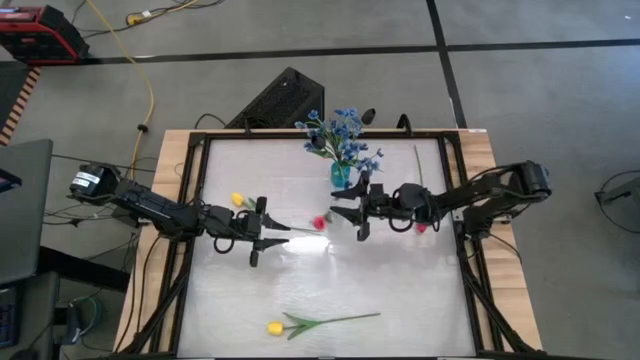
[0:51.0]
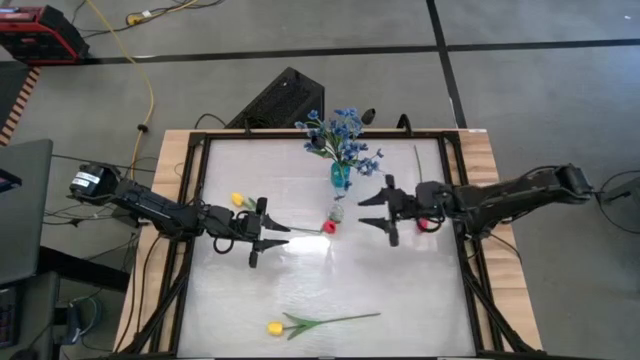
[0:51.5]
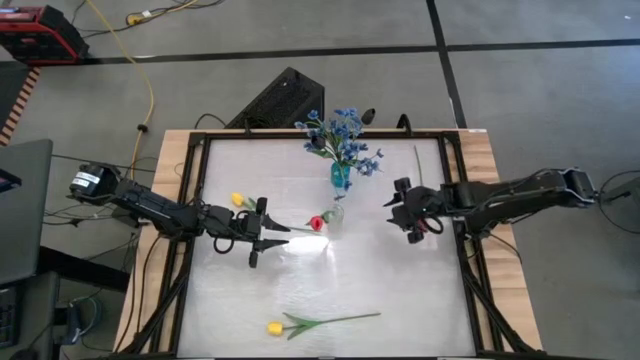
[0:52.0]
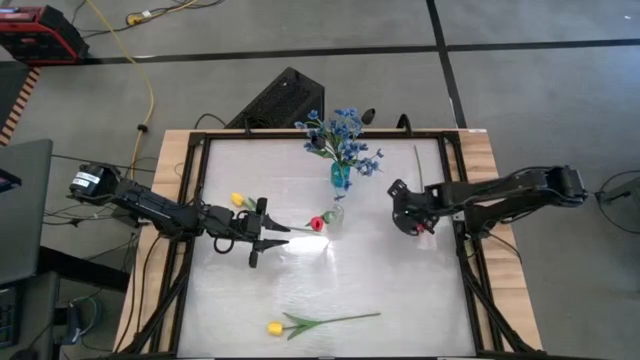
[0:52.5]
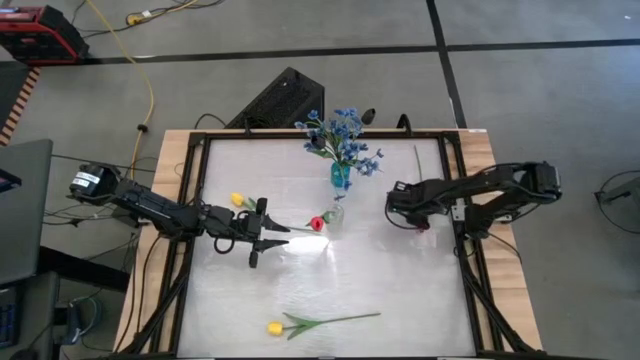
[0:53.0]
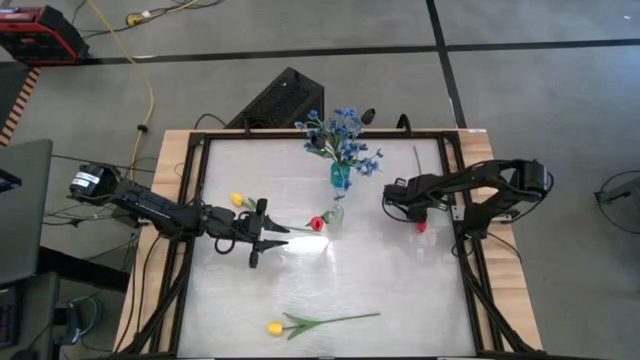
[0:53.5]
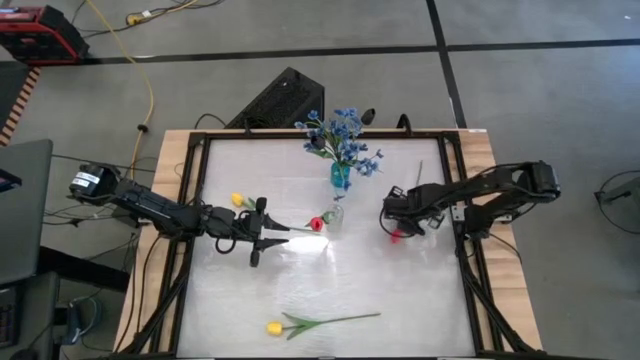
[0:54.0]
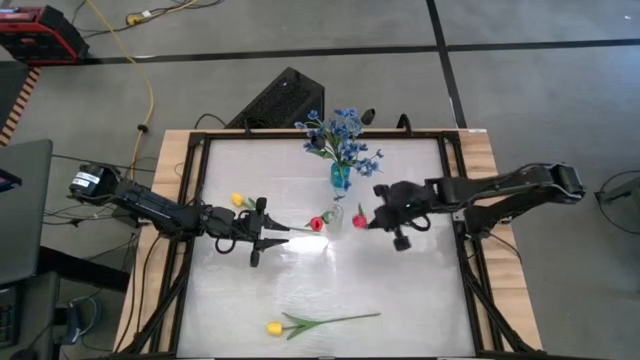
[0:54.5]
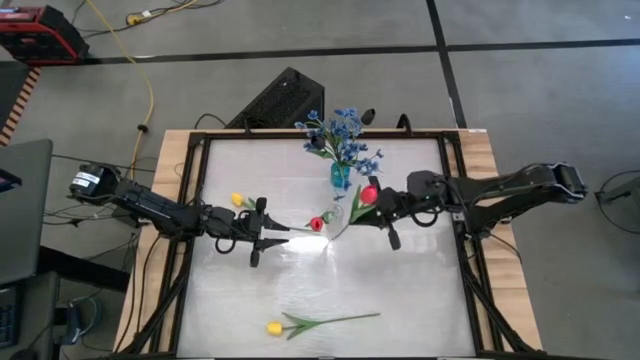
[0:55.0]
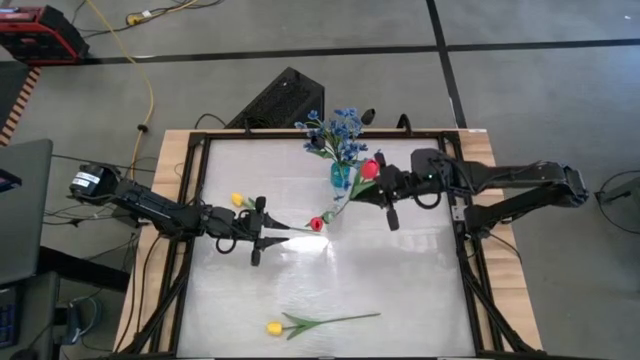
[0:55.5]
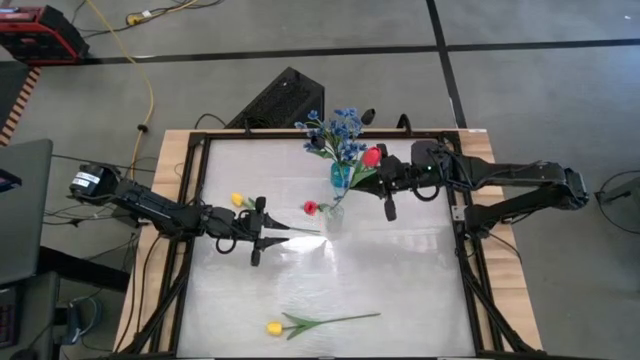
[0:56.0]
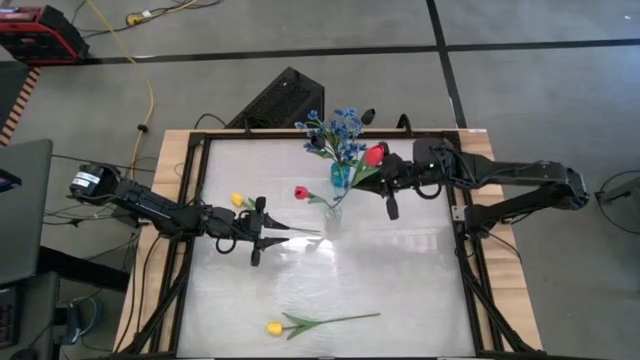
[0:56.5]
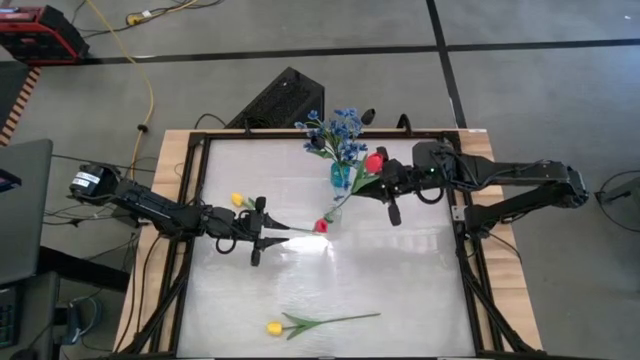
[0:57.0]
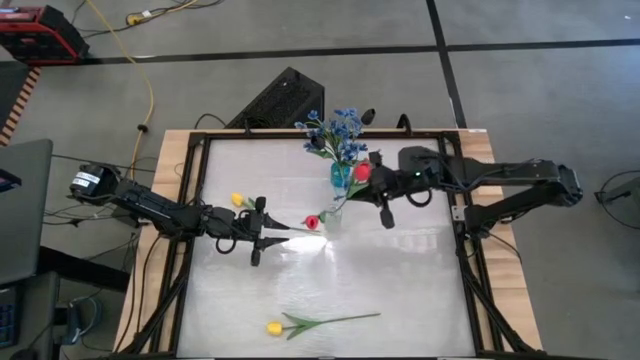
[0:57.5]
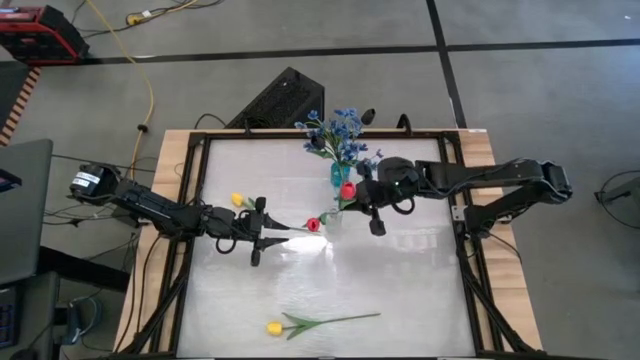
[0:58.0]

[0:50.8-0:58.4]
Task: Sort flowers into vase by color
Put the red flower into the transparent vase

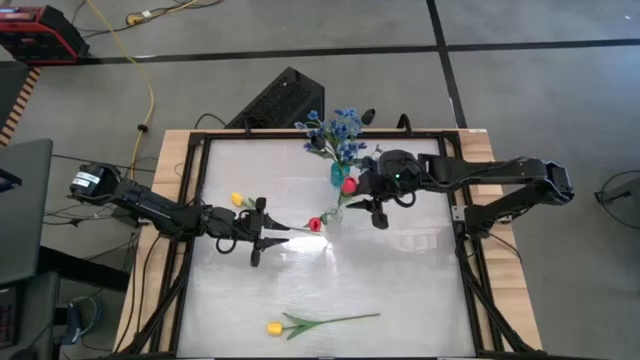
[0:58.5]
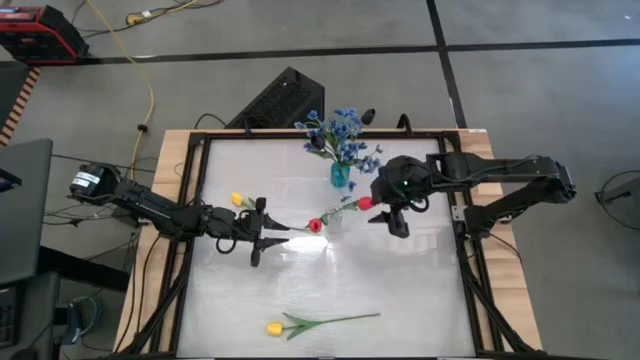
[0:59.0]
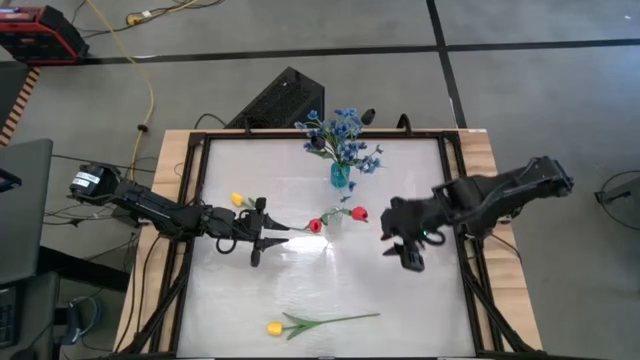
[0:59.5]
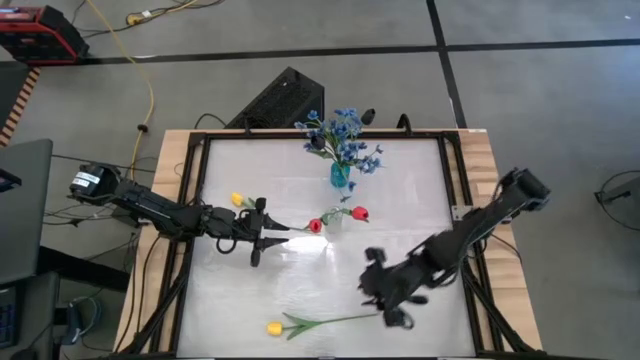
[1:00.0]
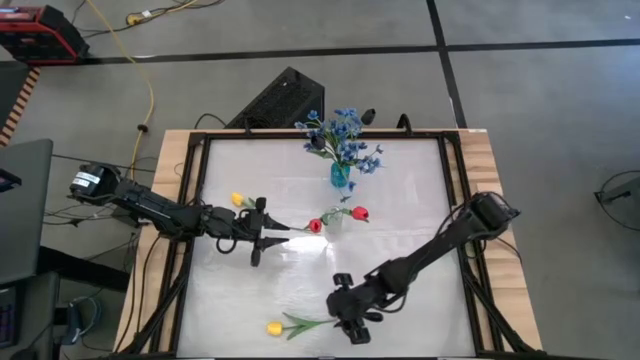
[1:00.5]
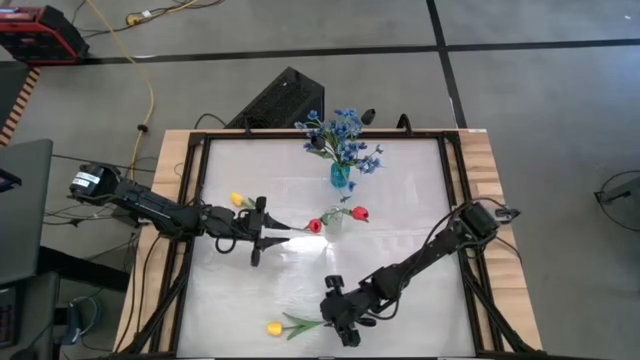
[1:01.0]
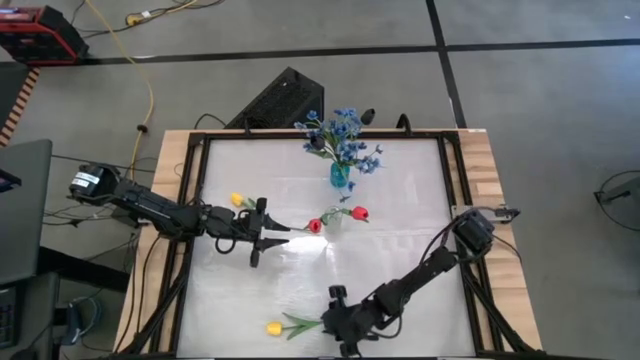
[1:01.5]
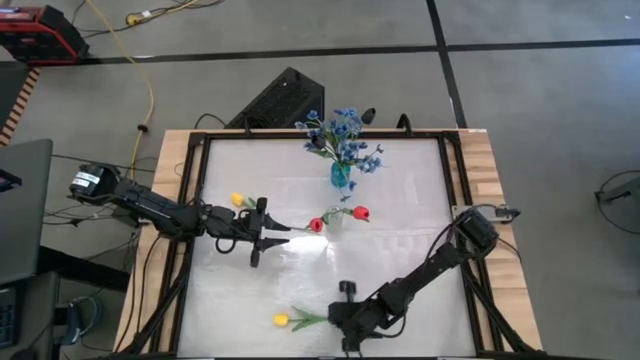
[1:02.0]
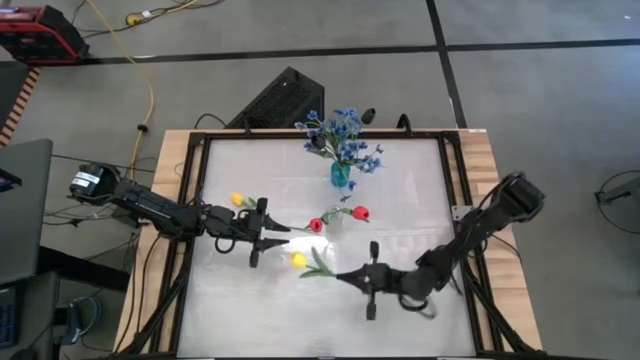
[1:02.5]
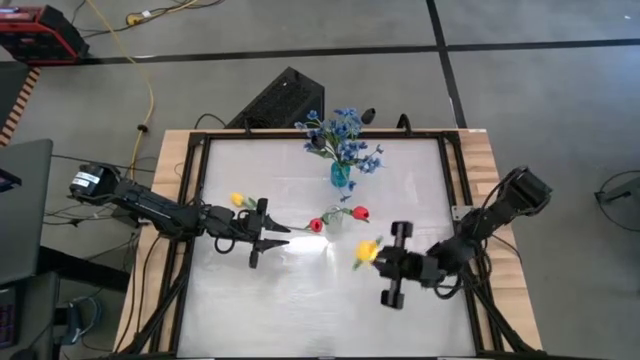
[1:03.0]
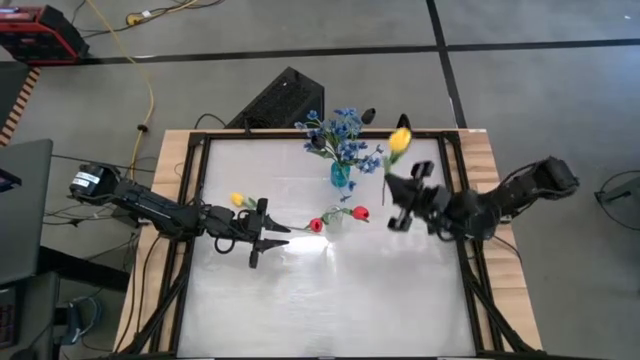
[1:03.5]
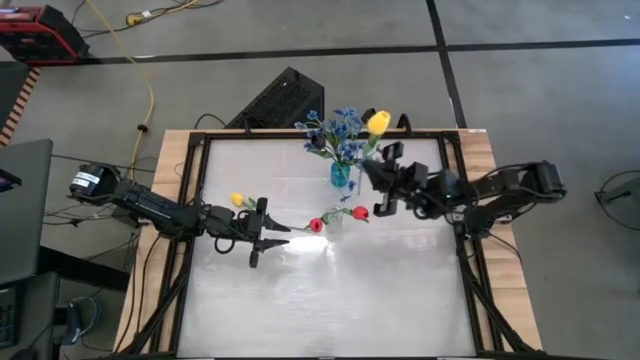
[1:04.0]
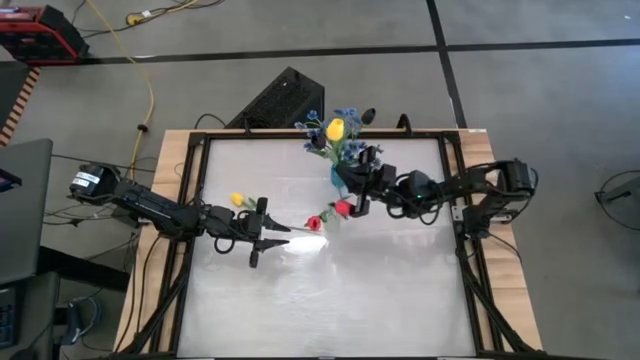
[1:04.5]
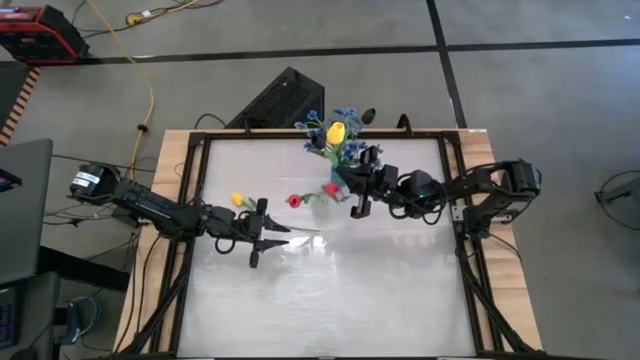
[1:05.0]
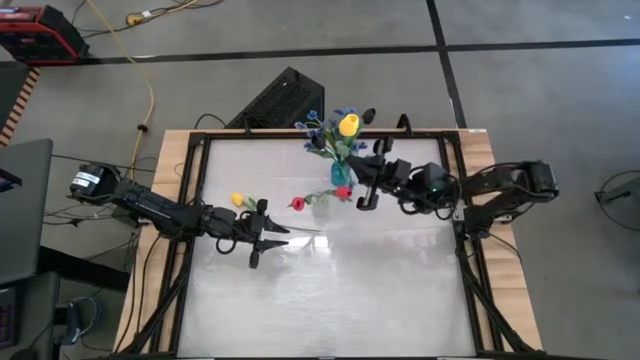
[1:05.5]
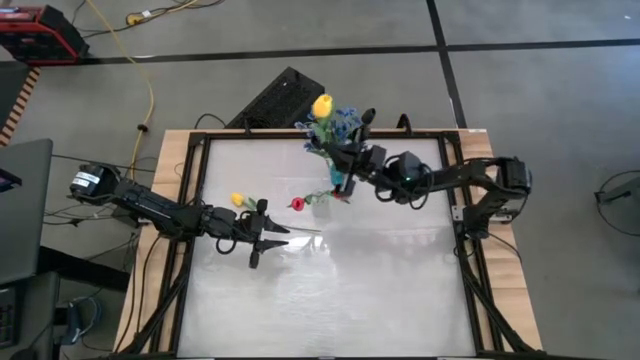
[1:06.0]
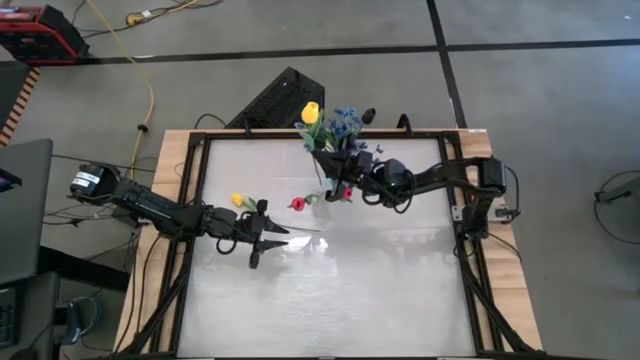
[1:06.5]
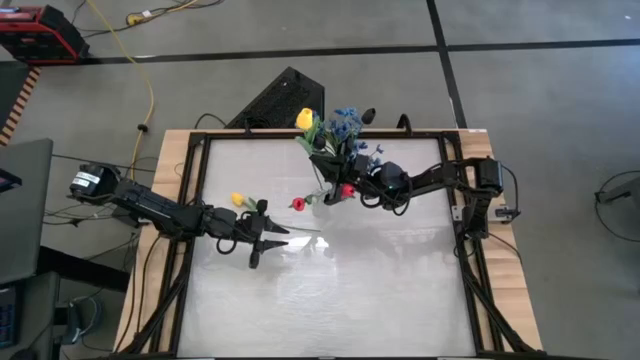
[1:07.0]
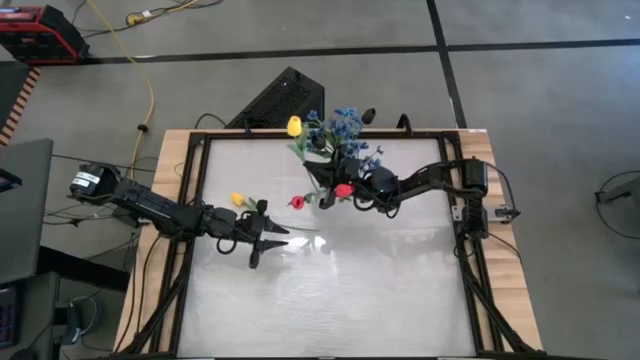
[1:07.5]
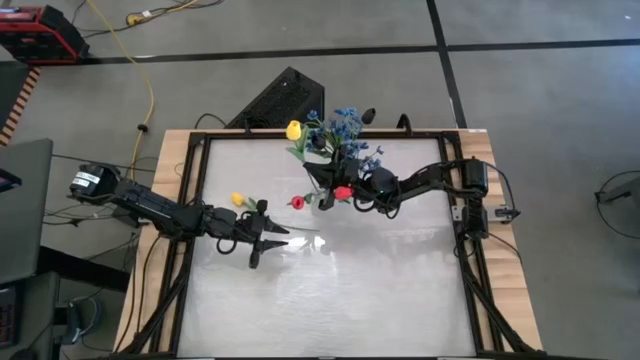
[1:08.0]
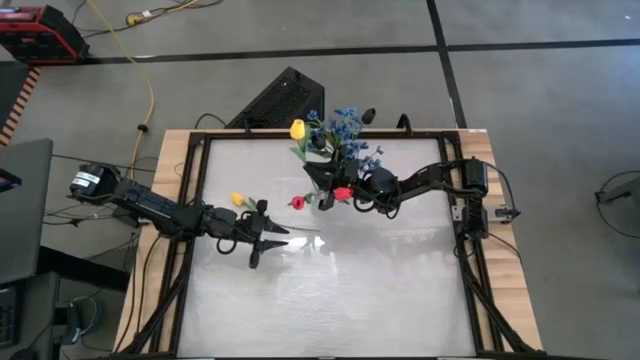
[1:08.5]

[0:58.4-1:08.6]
Put the yellow flower into the transparent vase

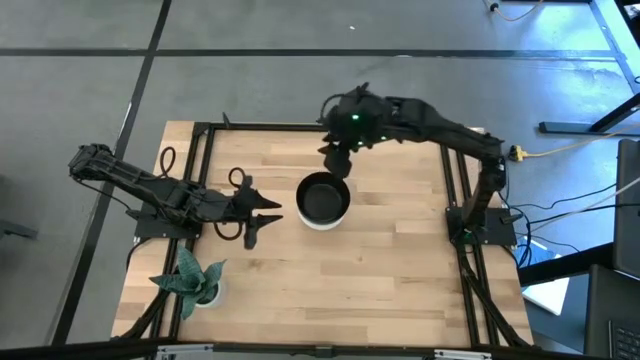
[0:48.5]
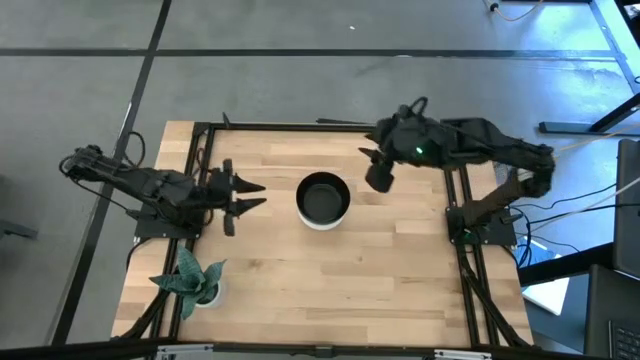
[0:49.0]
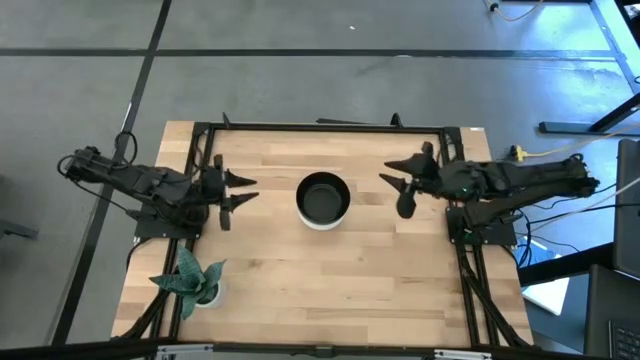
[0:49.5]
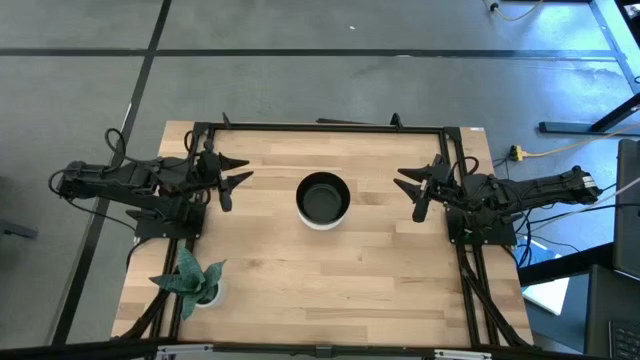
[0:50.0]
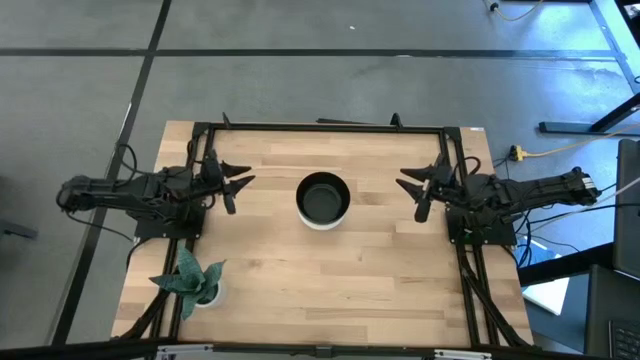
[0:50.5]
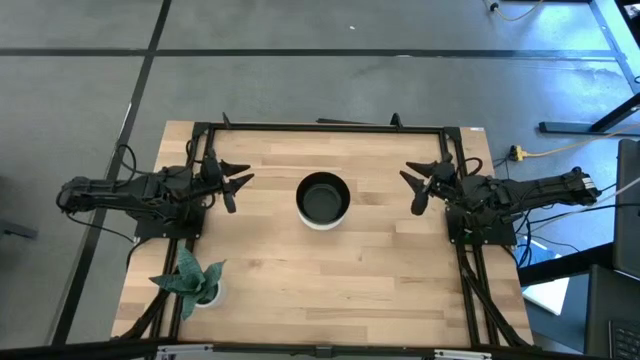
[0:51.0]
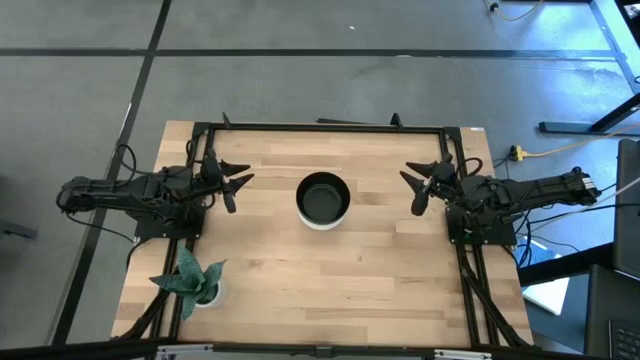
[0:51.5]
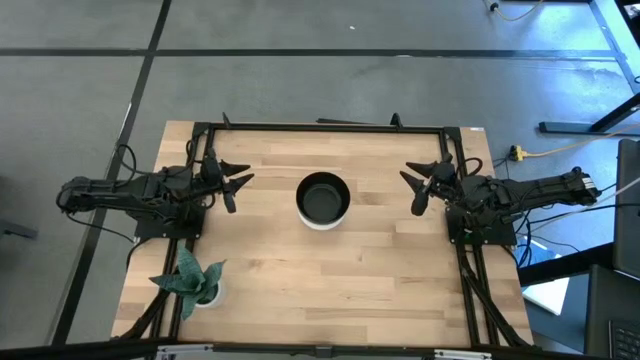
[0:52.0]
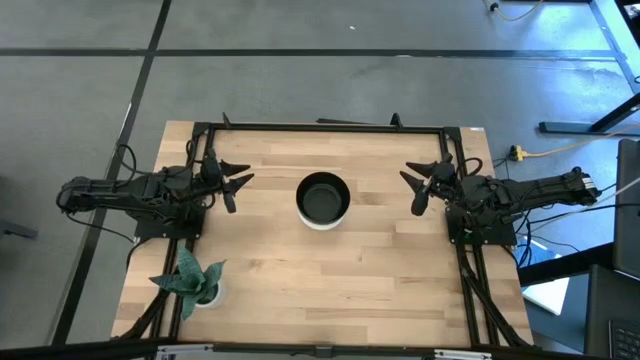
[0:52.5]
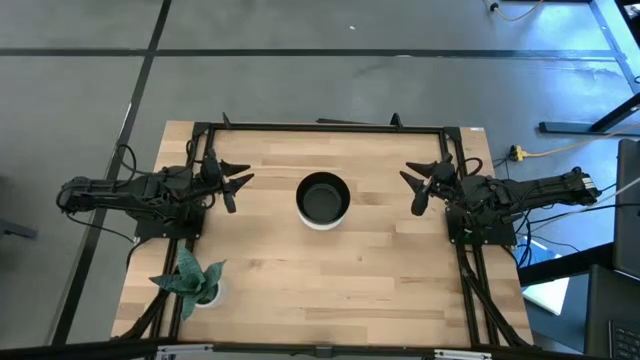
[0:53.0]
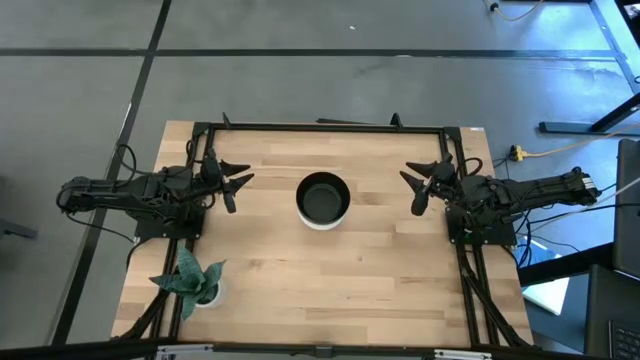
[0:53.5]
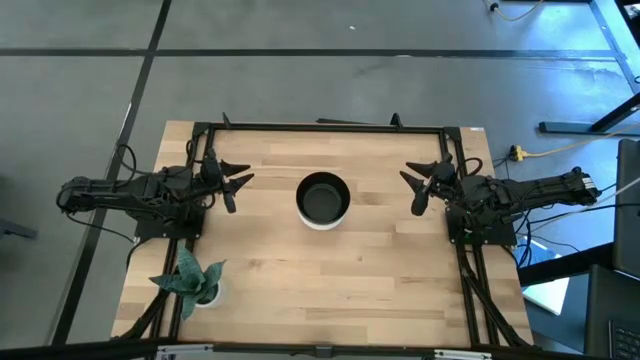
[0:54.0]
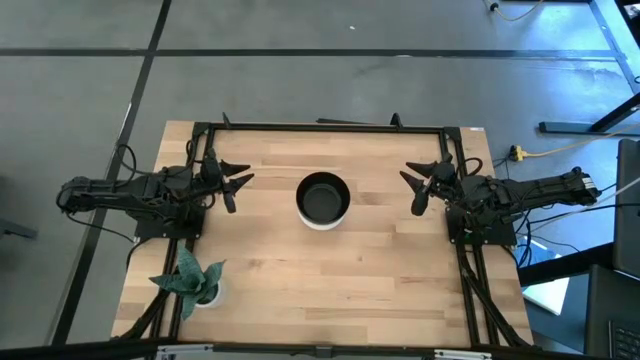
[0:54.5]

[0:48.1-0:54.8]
Task: Nest bowls inside each other
Return to Home Position
